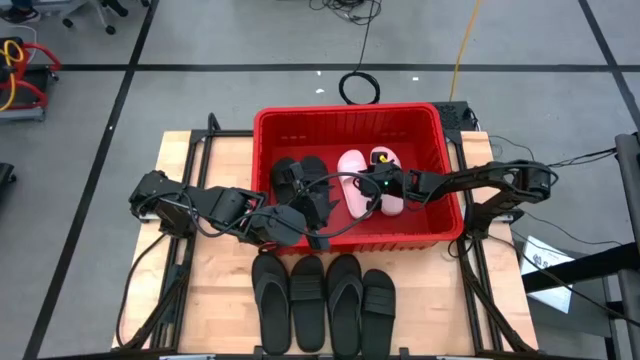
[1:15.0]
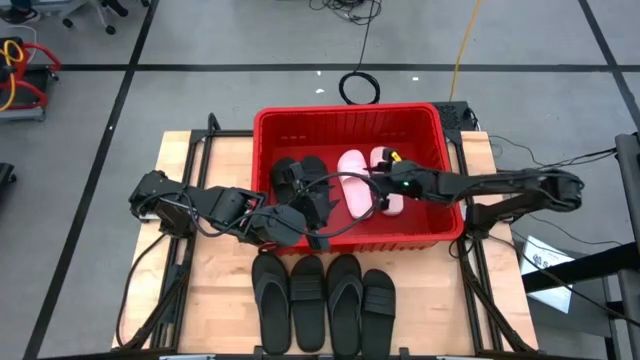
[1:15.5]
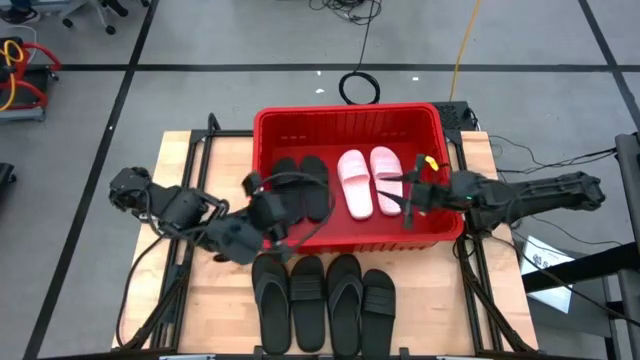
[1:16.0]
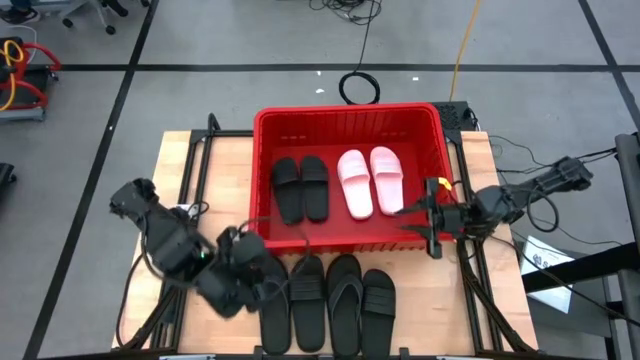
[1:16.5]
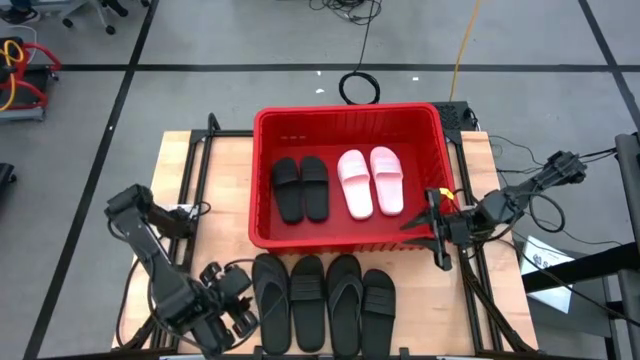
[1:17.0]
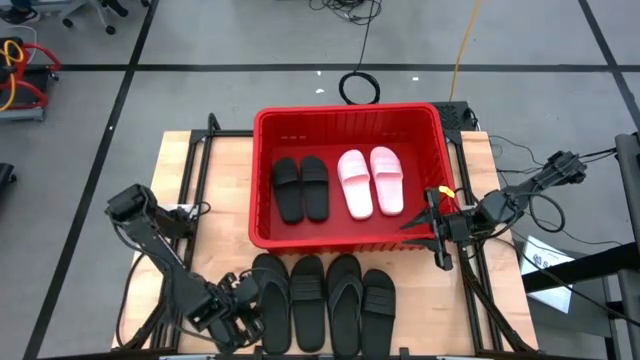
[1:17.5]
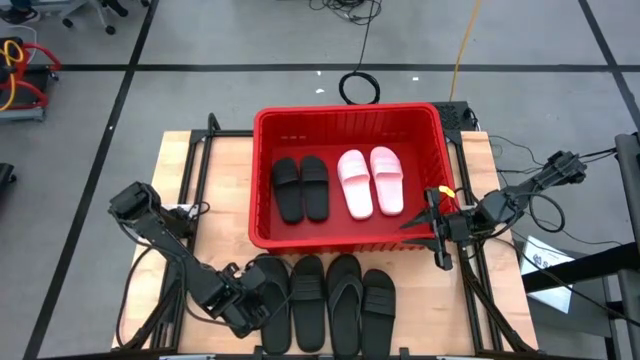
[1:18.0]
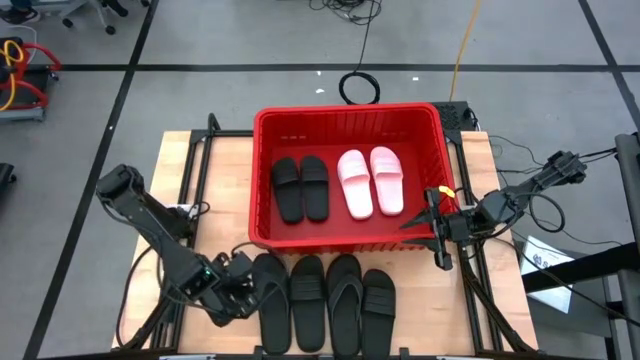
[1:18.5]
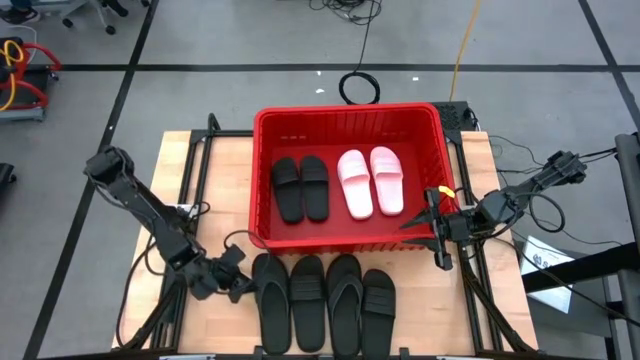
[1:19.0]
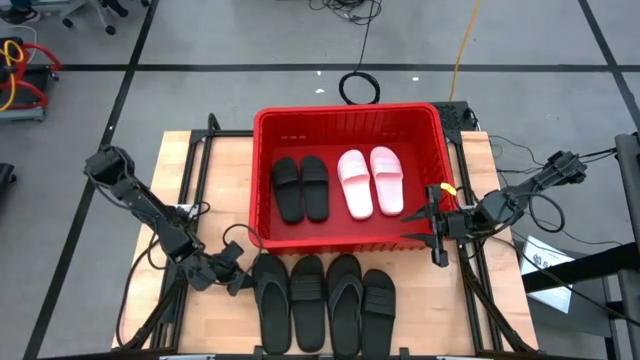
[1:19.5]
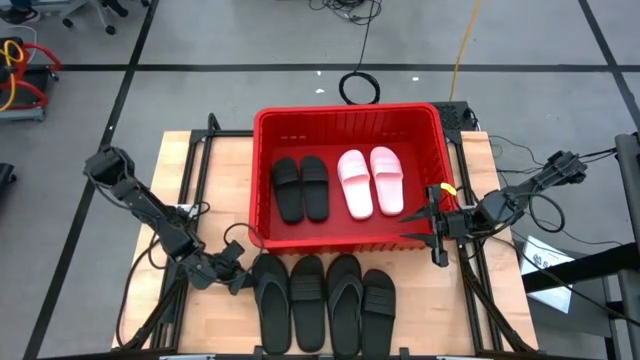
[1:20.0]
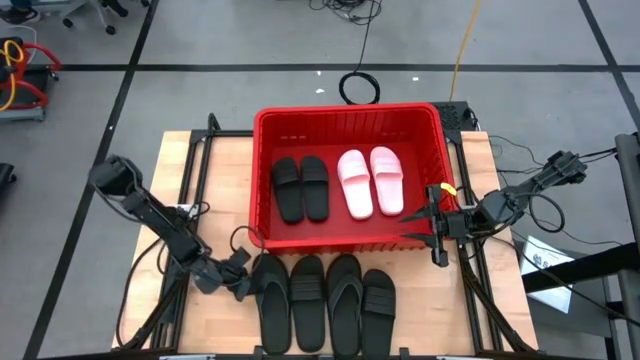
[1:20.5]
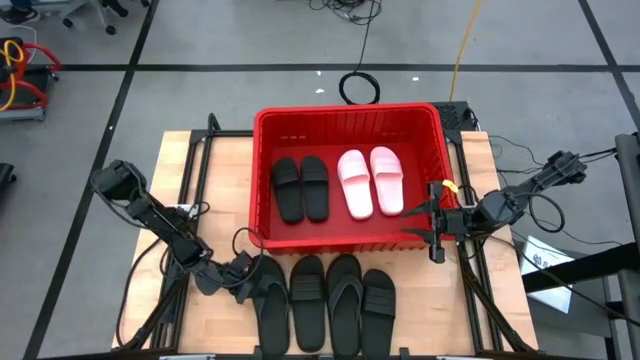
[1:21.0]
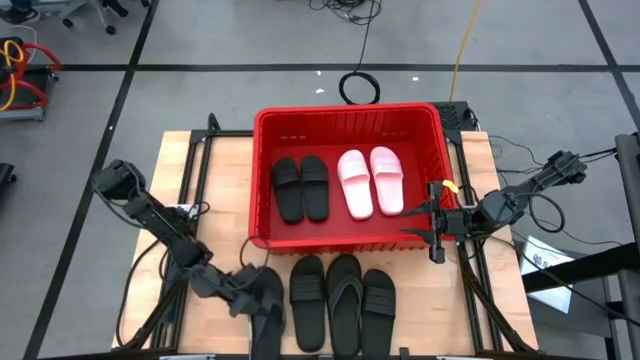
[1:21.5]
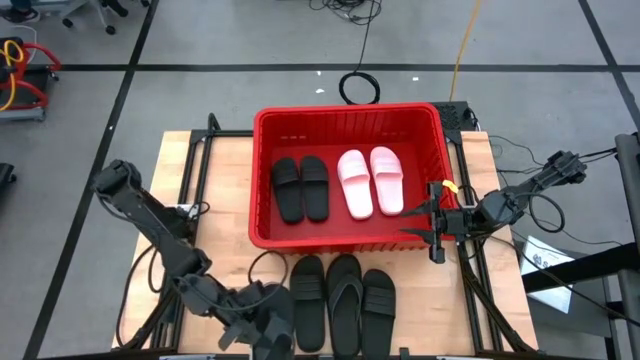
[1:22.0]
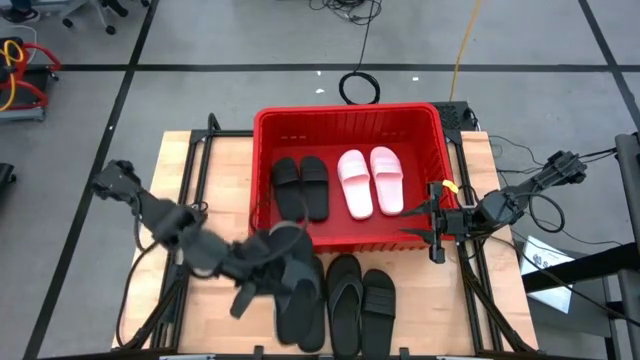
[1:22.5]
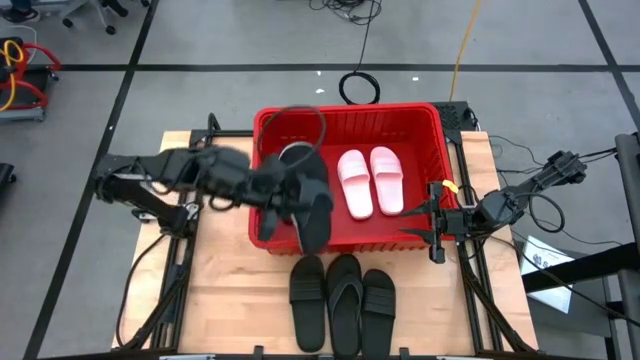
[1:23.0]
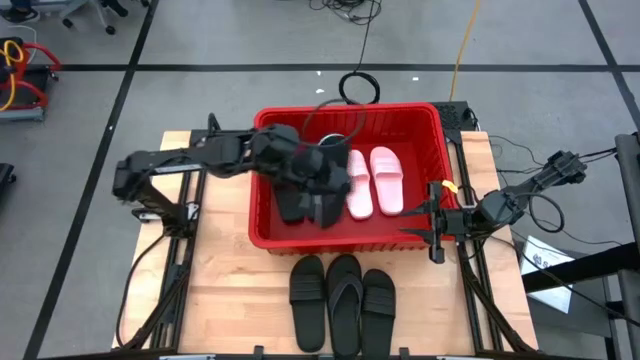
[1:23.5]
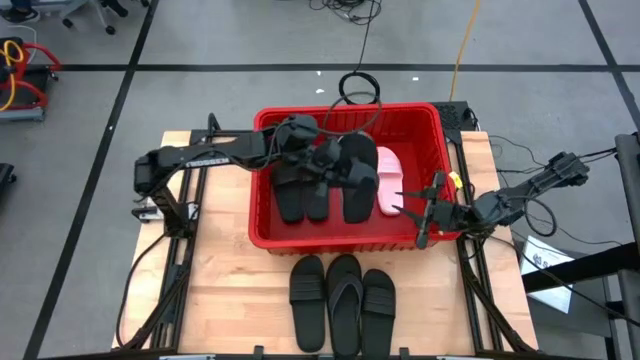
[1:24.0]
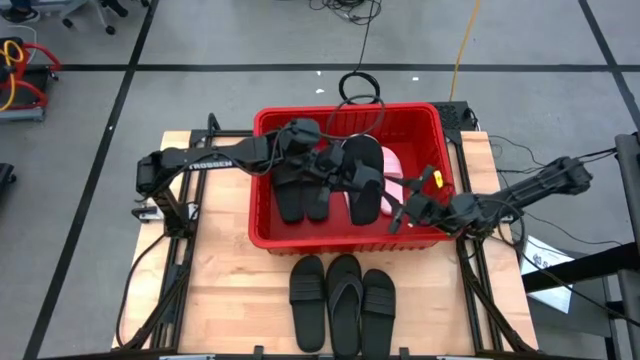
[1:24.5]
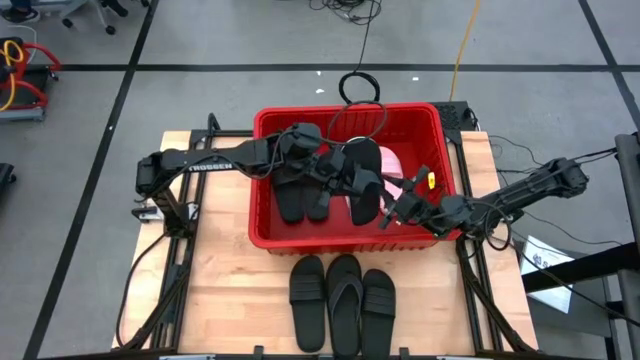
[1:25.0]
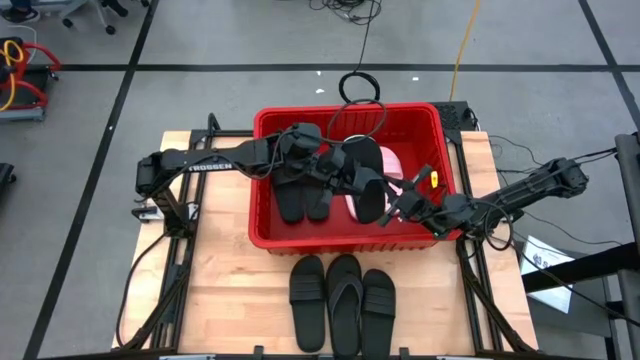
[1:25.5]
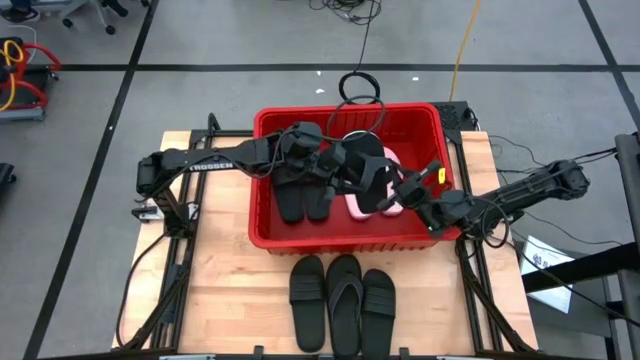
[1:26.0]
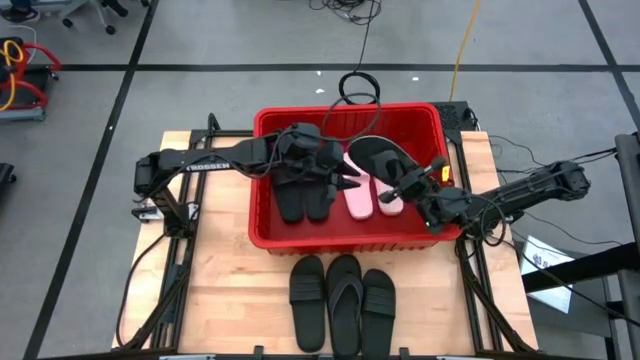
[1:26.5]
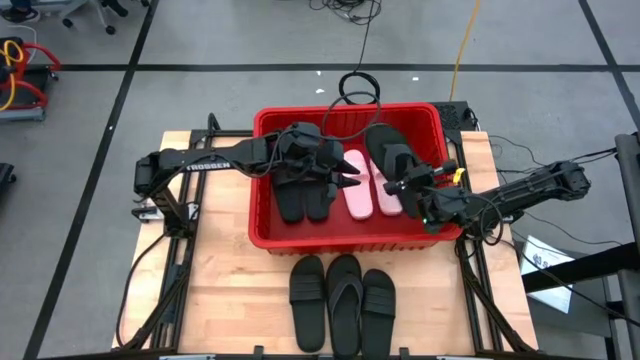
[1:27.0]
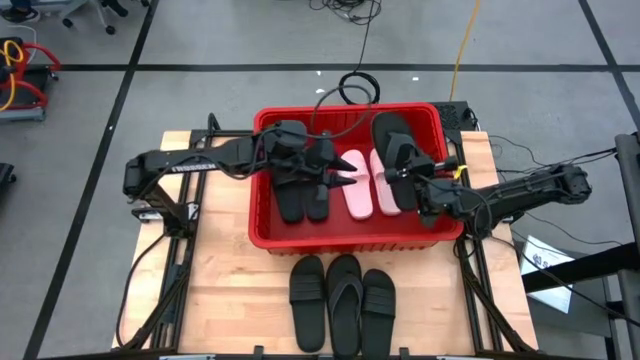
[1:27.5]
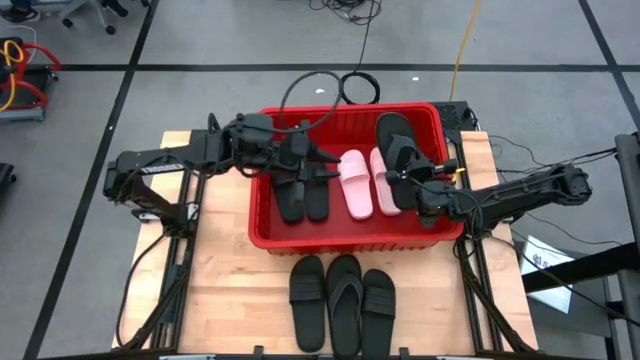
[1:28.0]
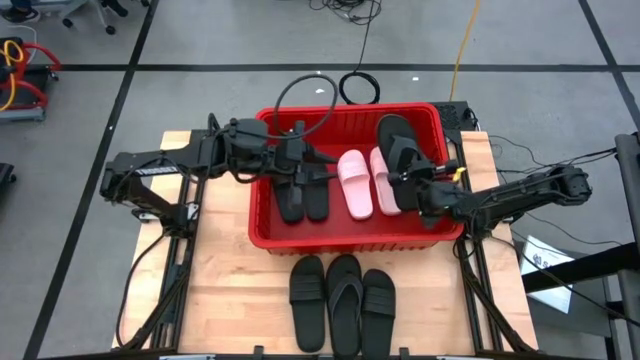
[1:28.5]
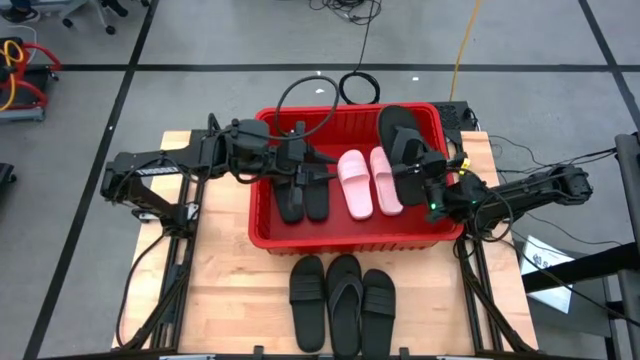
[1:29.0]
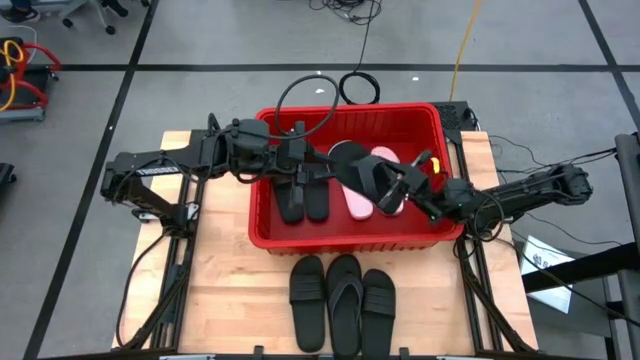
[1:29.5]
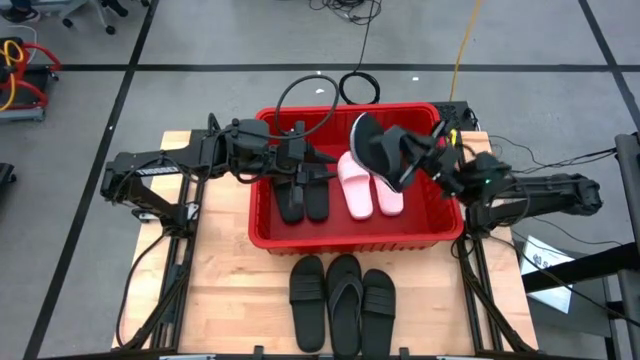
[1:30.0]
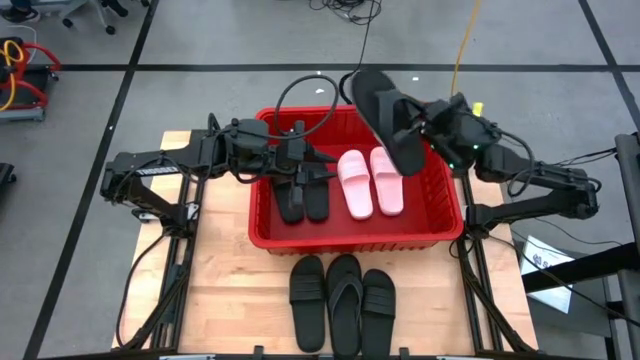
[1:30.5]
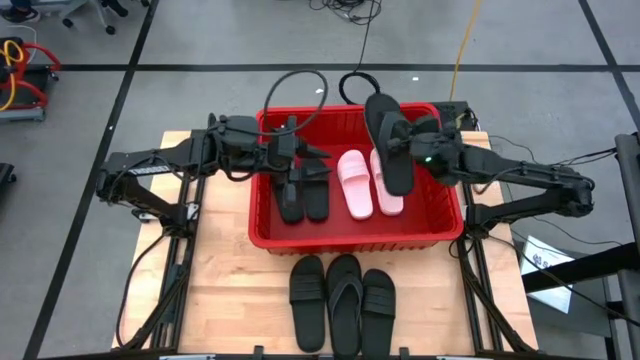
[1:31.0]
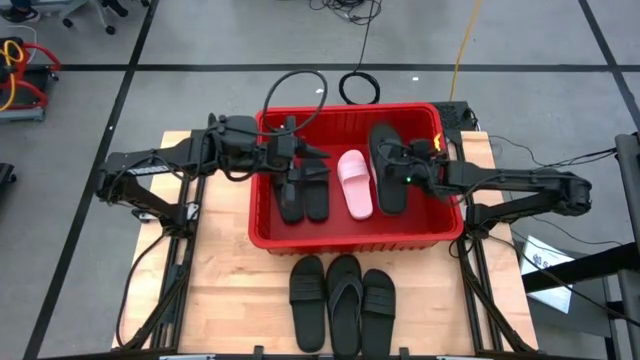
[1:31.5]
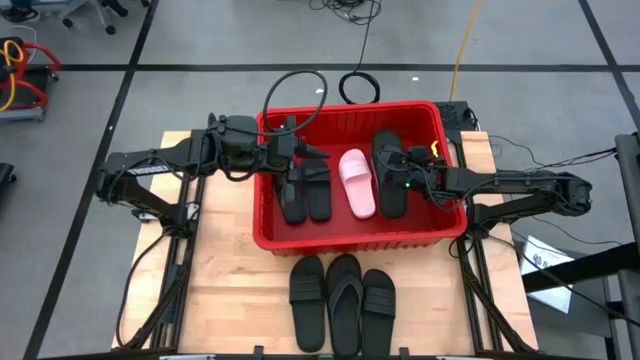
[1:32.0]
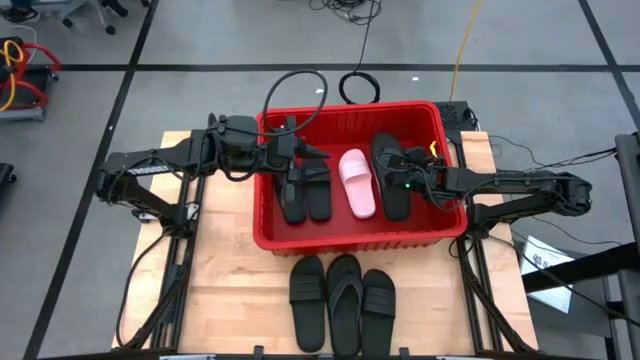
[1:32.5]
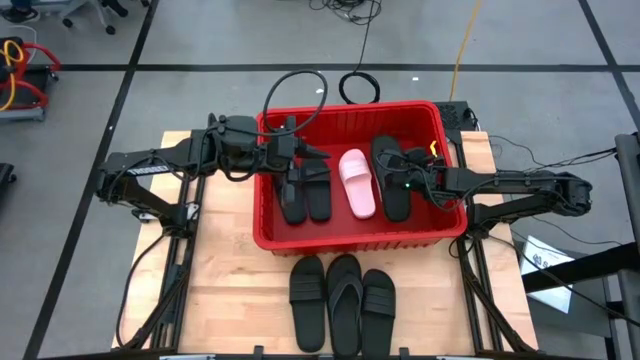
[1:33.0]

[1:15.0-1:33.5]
Task: Pick and place slides into bin
Put the black slipper into the red bin

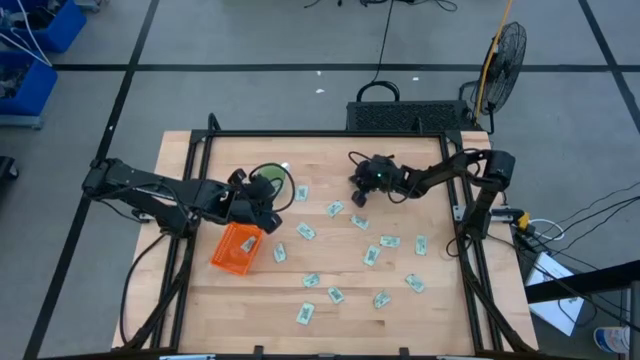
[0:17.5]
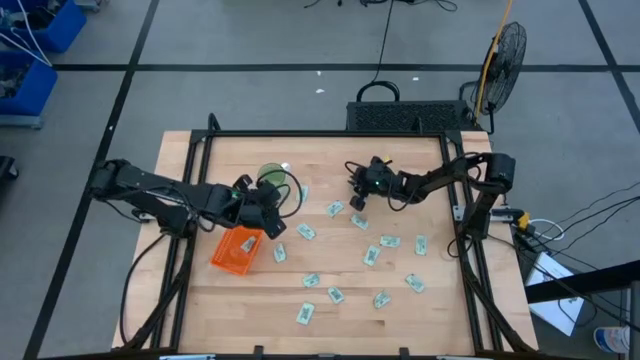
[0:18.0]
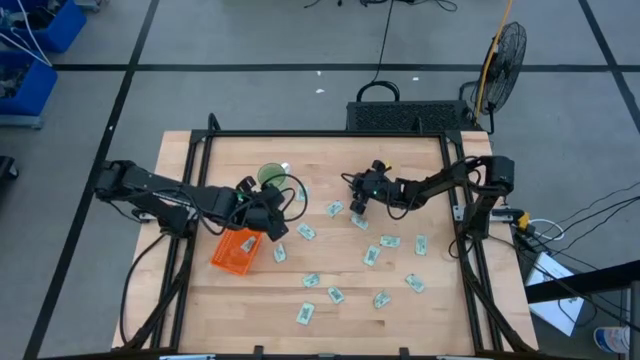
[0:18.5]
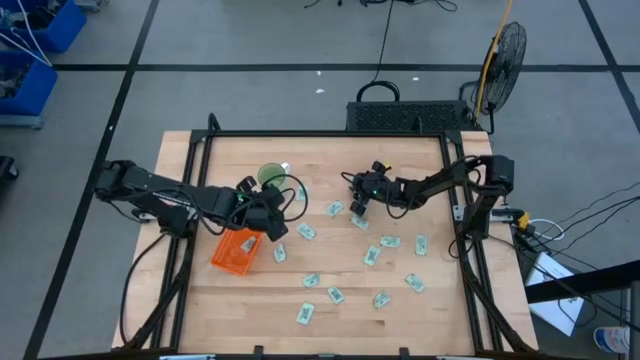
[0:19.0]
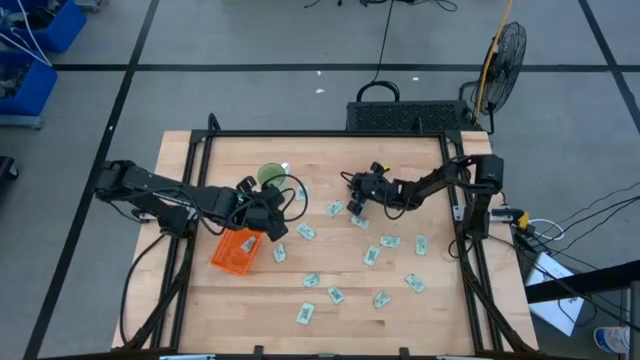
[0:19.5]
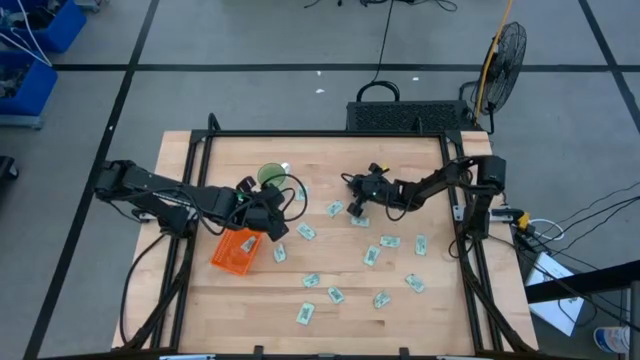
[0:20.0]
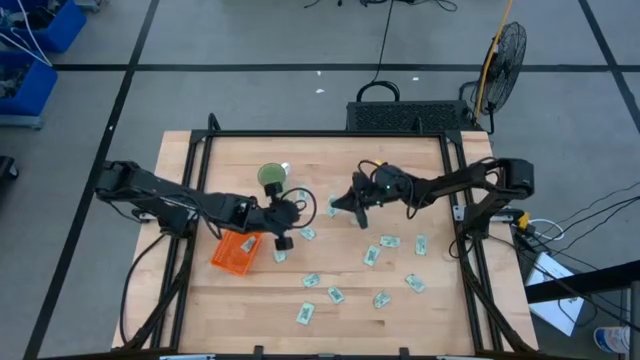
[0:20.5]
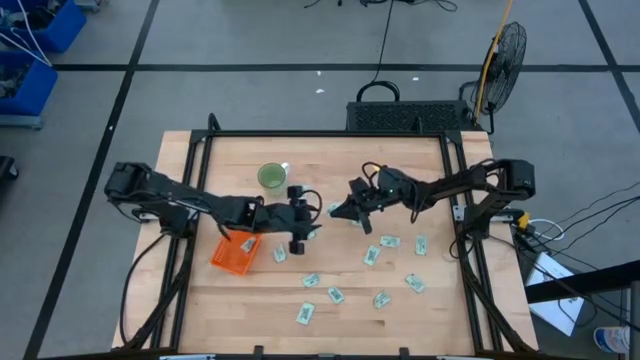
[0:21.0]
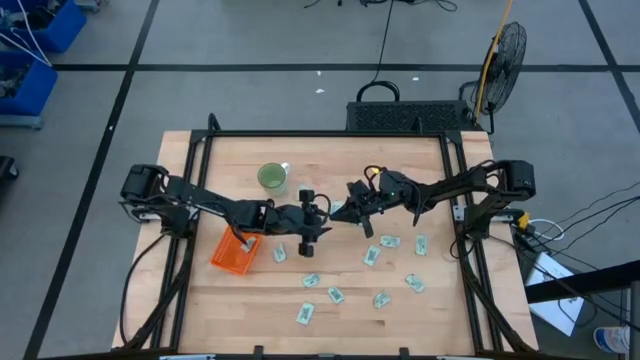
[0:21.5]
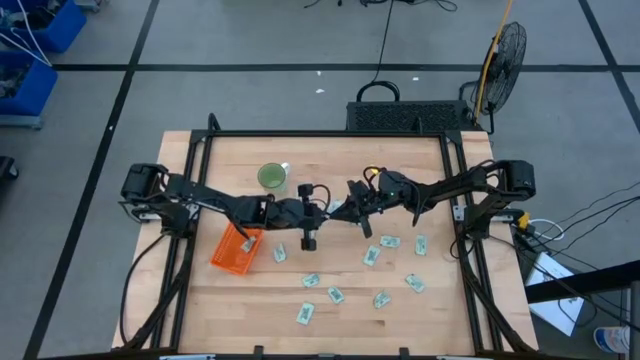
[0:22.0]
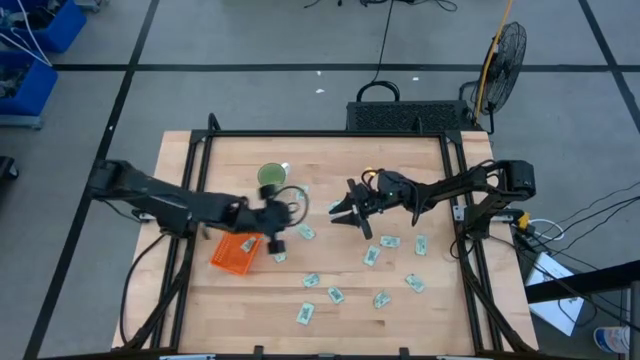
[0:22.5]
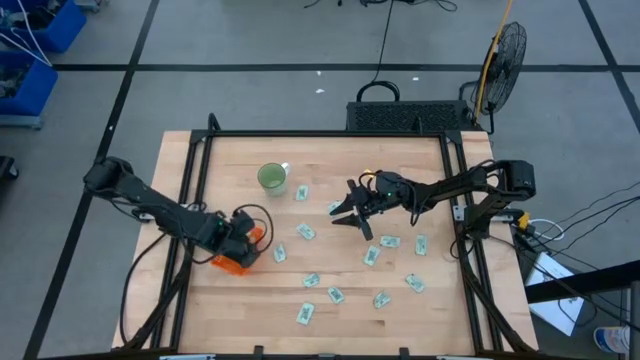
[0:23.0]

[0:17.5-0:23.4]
Task: Pick and place Stevia / Truvia into bins
Put the stevia packet into the orange bin
